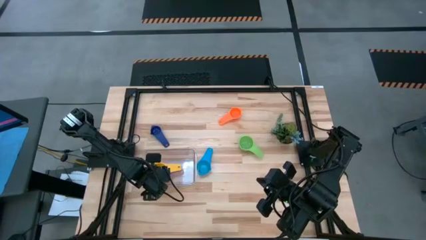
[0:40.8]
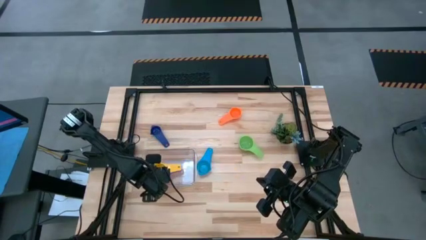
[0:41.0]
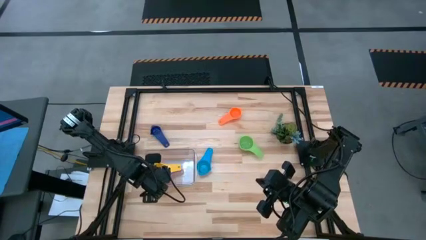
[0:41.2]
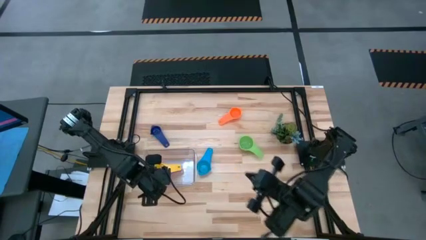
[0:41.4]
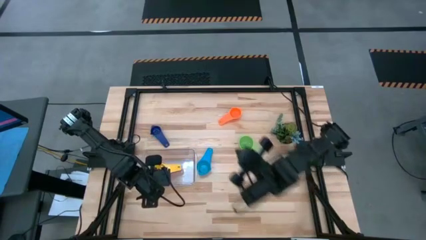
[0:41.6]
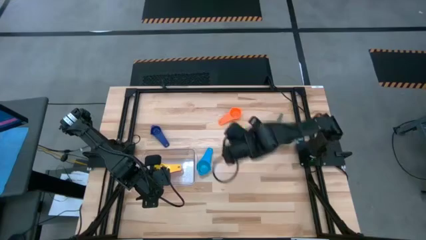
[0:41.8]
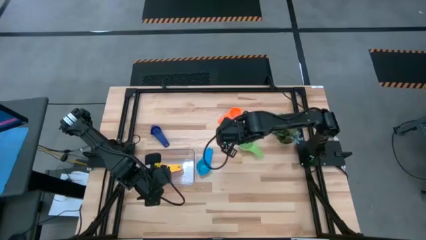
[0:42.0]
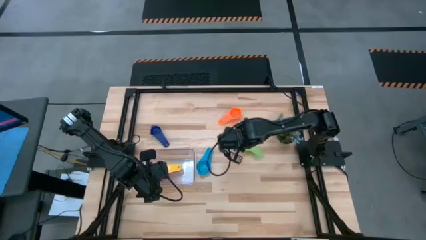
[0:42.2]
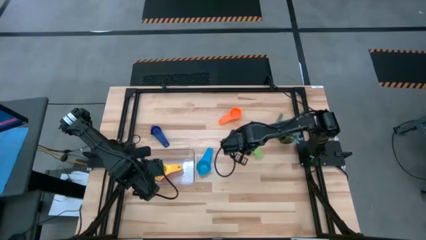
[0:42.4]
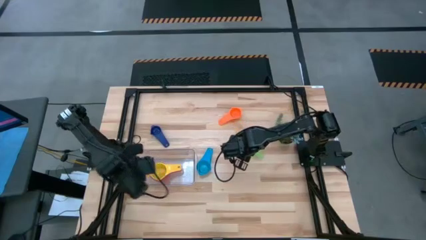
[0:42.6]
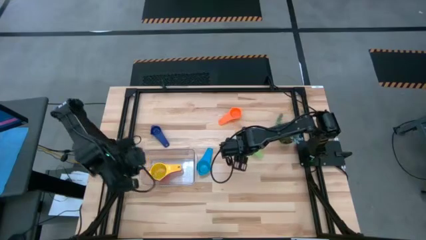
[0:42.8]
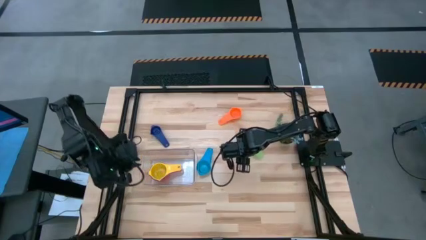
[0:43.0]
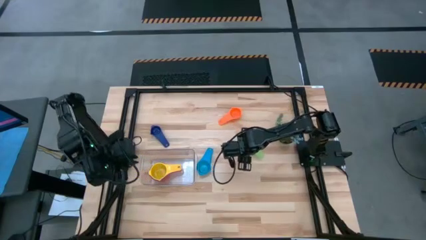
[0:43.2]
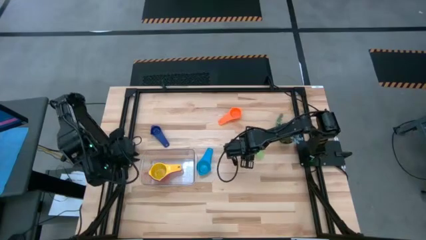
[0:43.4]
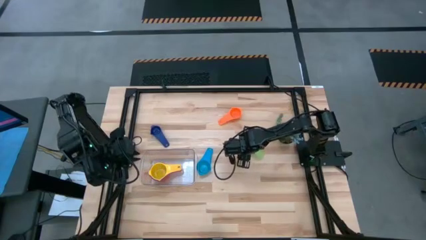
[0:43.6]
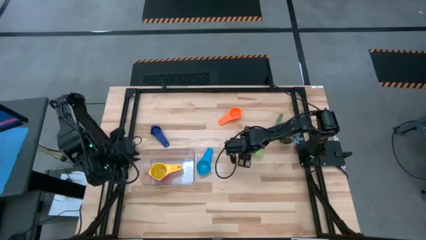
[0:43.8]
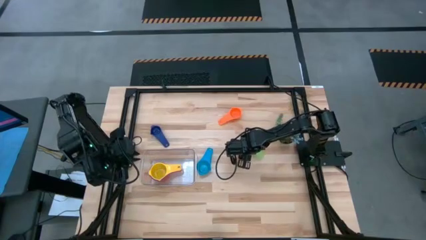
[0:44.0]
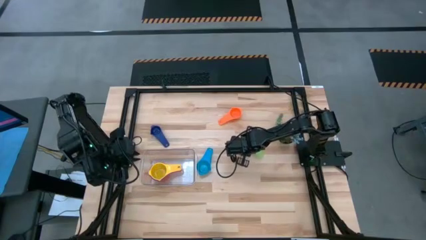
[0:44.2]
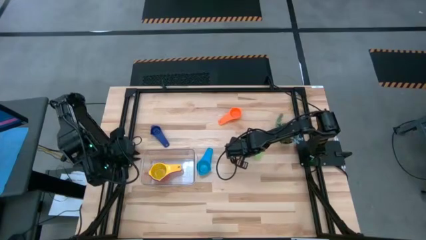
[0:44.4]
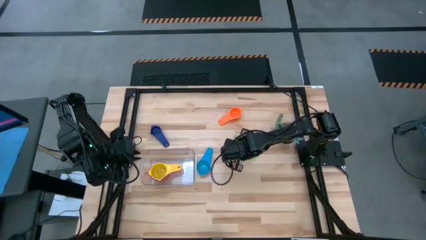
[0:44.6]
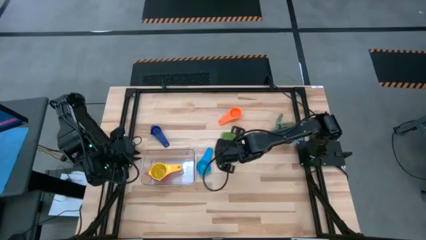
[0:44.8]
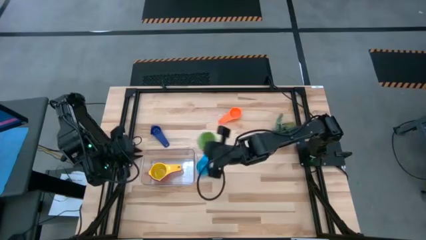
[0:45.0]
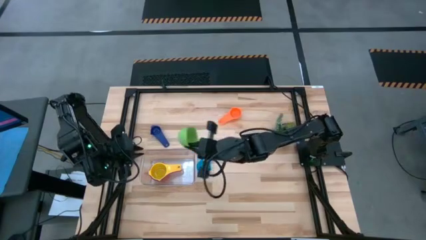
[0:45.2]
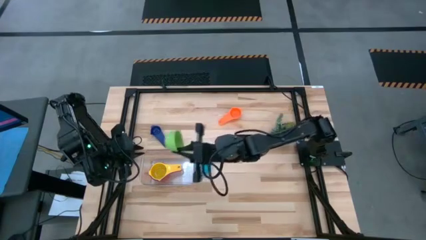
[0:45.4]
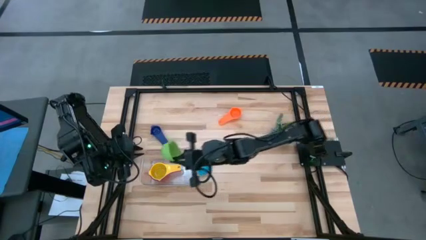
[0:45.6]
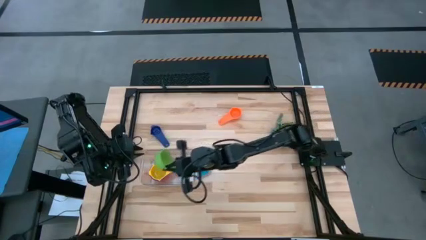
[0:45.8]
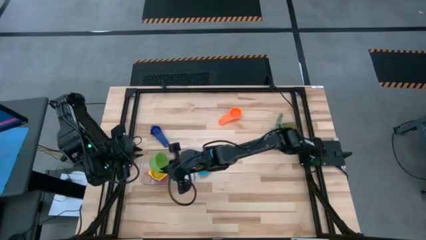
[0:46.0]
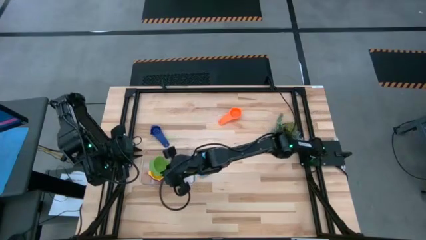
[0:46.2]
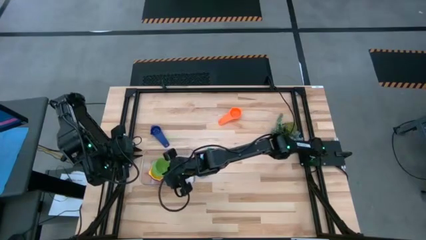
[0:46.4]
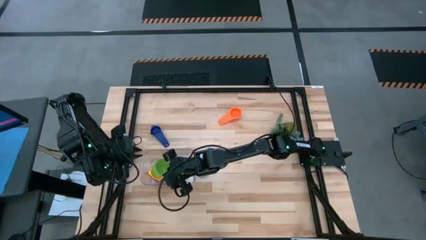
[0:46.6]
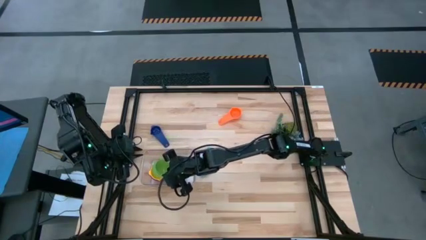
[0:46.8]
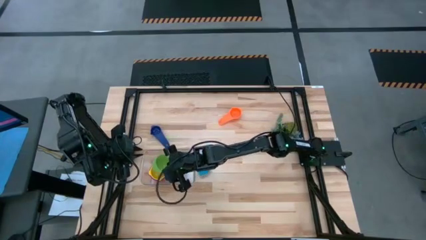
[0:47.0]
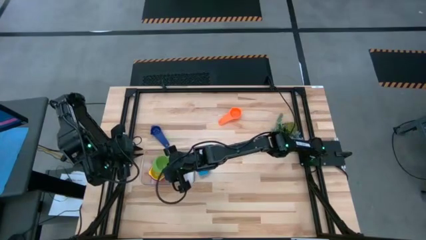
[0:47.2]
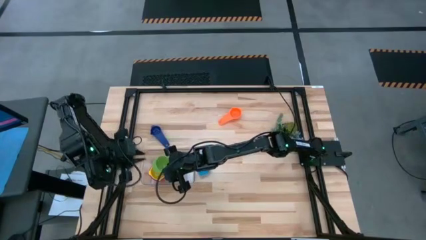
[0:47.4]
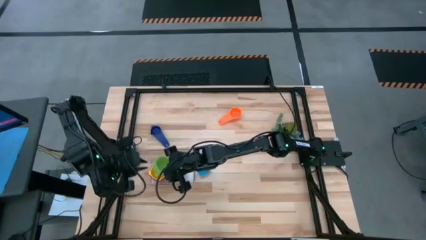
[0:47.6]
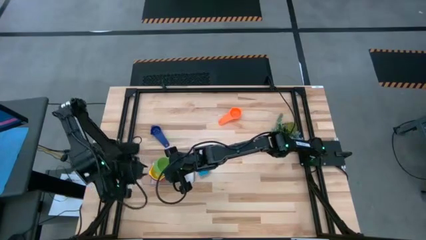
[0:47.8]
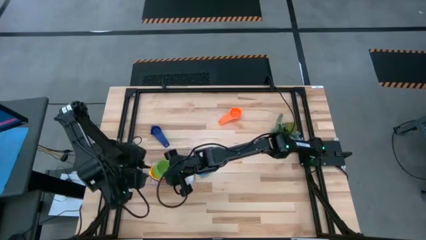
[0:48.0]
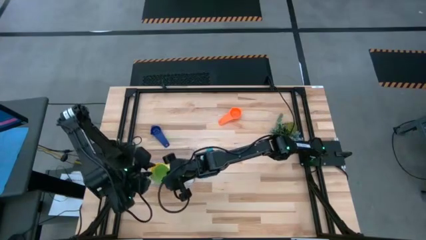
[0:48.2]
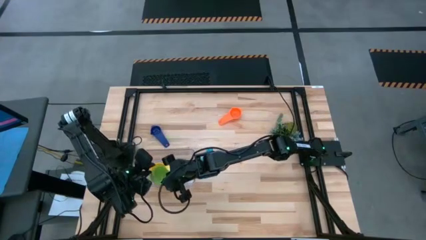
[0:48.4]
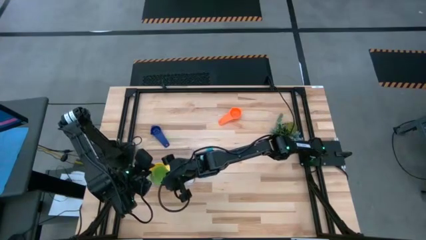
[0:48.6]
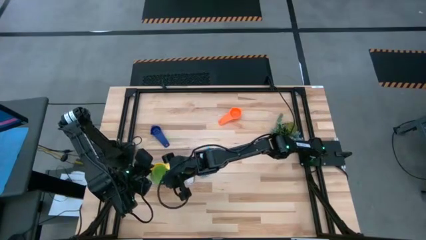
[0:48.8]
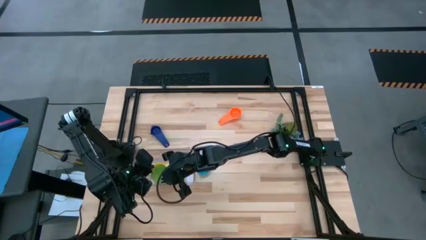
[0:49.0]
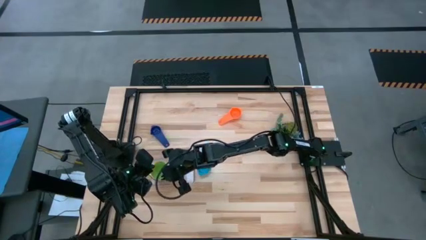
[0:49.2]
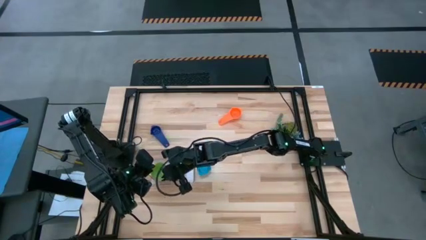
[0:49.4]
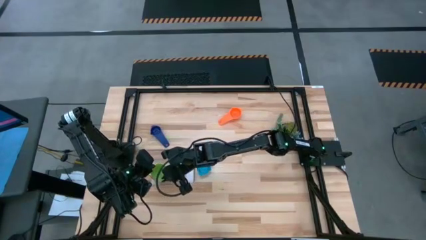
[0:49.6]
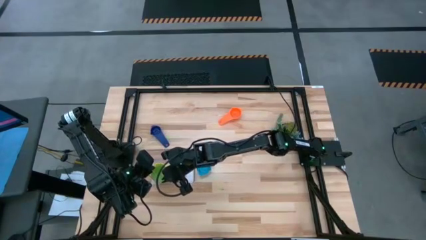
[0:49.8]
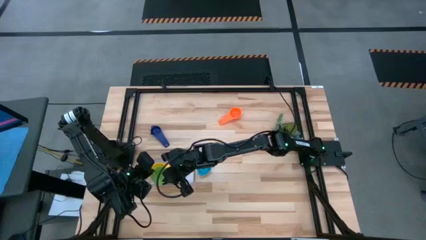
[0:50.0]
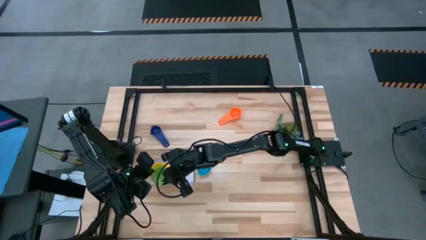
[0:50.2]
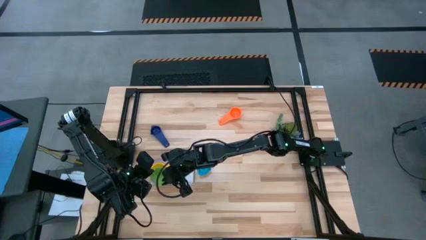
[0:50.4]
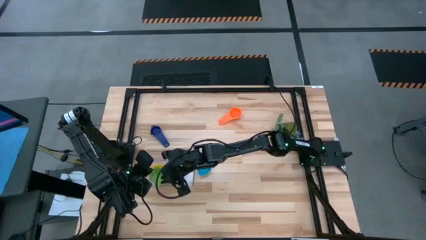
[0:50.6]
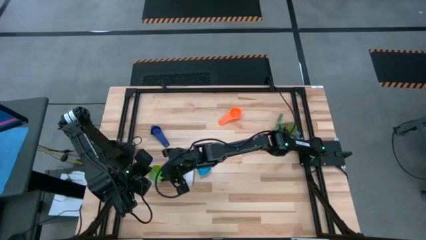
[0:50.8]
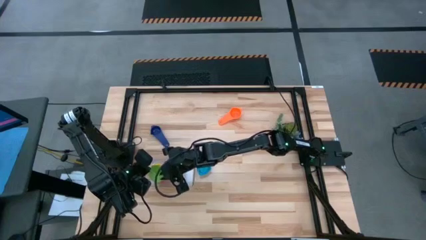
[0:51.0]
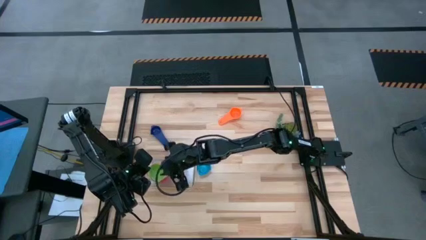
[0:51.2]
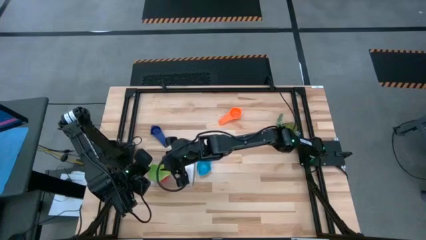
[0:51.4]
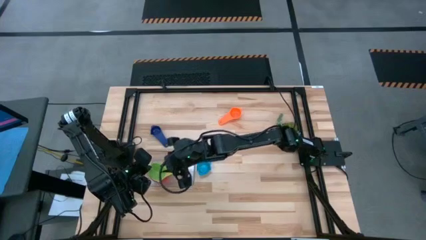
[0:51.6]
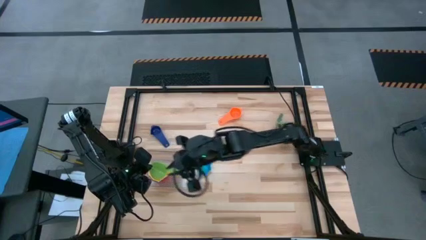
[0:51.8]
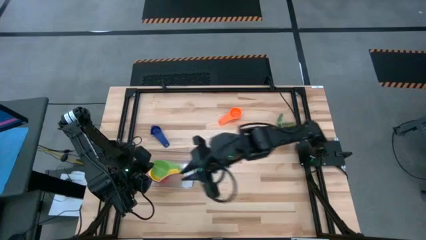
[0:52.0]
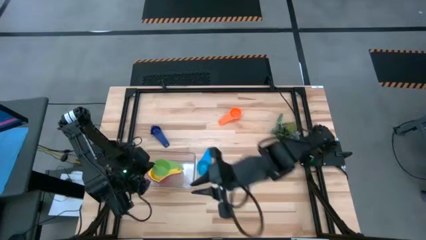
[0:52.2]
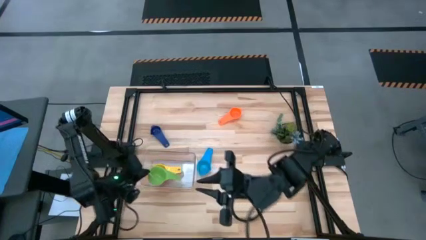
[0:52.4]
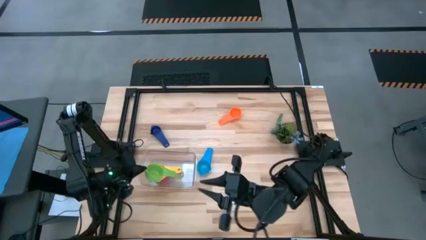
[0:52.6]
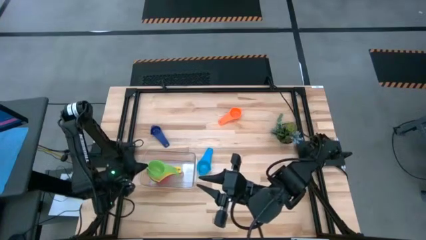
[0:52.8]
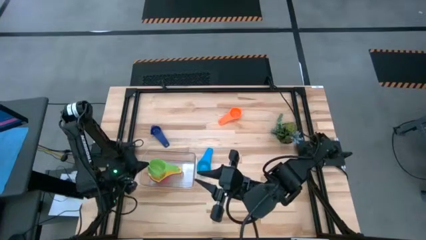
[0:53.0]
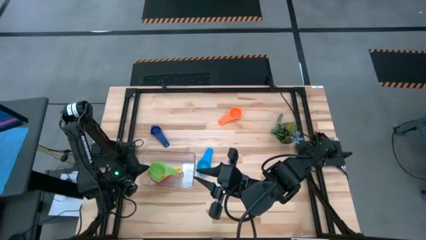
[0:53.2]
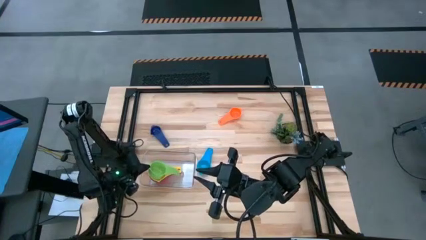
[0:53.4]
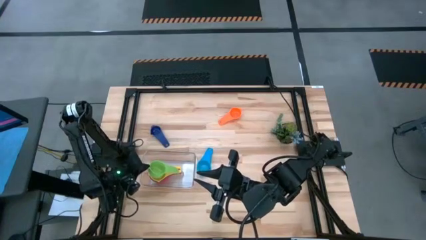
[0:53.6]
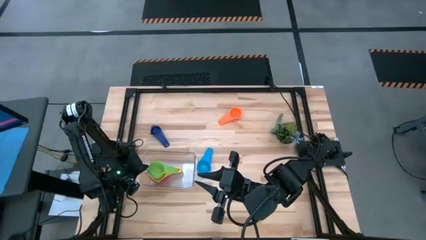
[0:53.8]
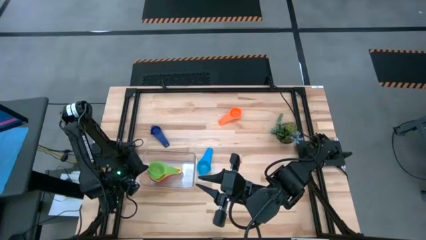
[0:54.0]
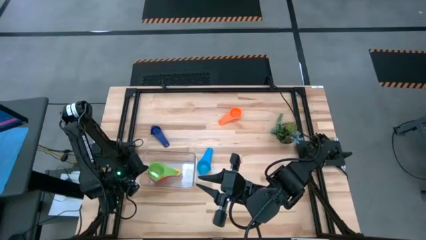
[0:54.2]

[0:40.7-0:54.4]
Task: Nest measuring cups in basket
Stack the green measuring cup on the yellow measuring cup in the transparent bin
